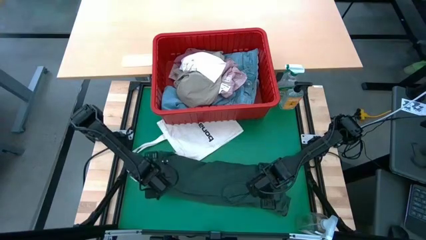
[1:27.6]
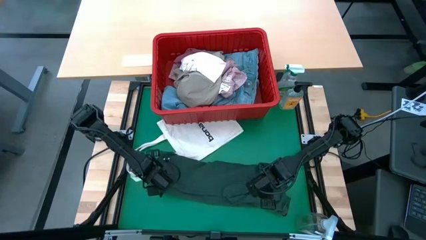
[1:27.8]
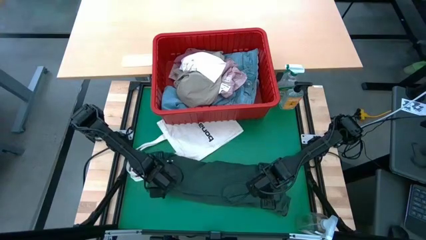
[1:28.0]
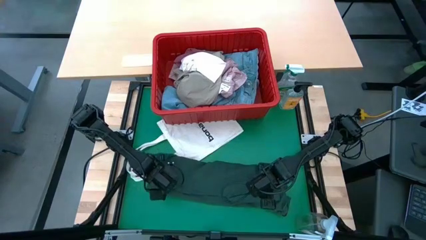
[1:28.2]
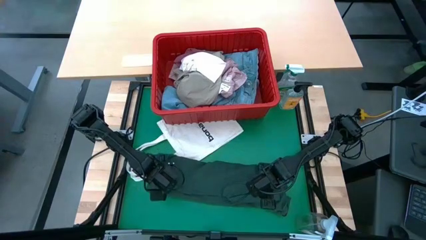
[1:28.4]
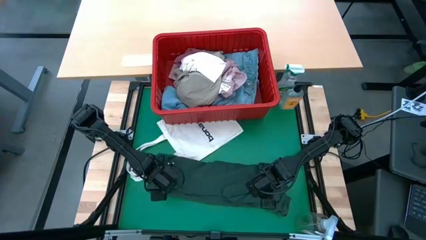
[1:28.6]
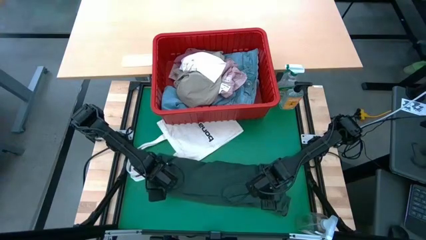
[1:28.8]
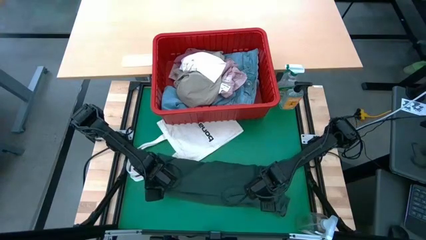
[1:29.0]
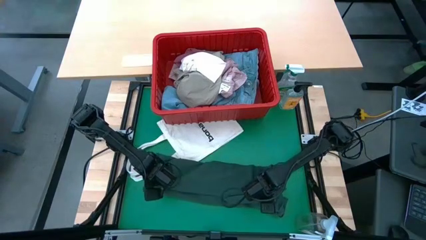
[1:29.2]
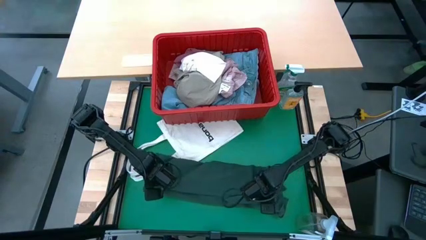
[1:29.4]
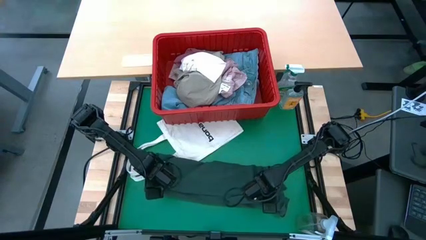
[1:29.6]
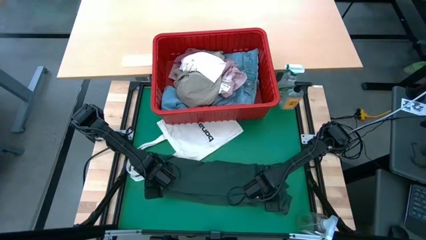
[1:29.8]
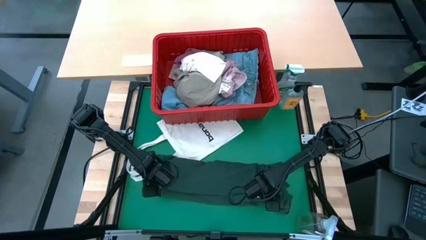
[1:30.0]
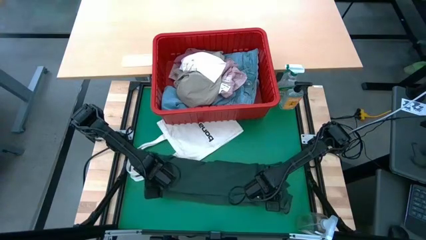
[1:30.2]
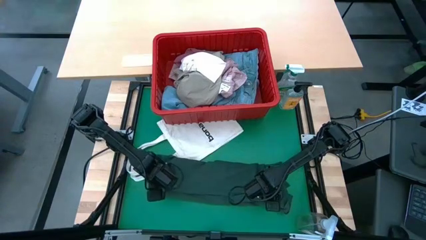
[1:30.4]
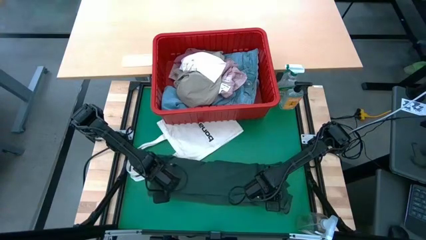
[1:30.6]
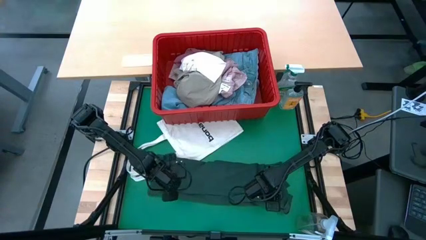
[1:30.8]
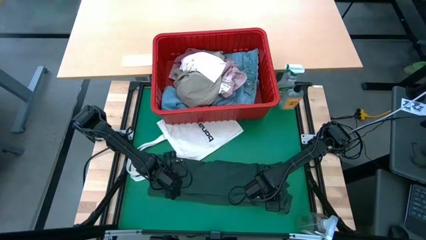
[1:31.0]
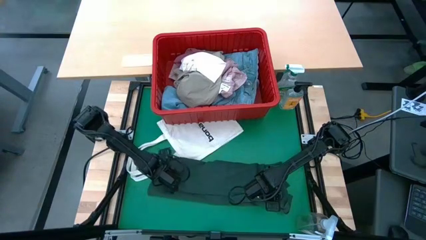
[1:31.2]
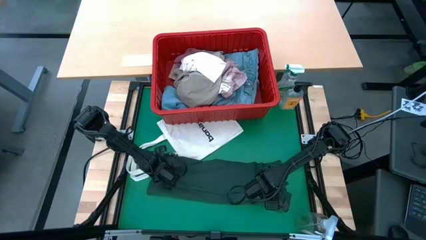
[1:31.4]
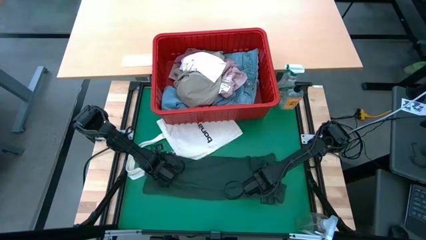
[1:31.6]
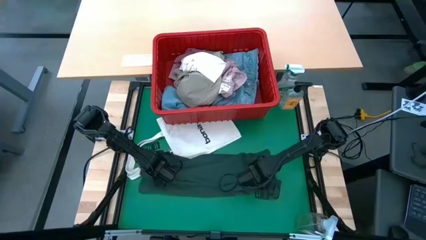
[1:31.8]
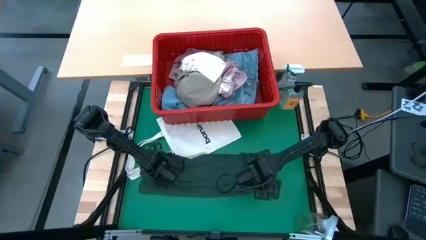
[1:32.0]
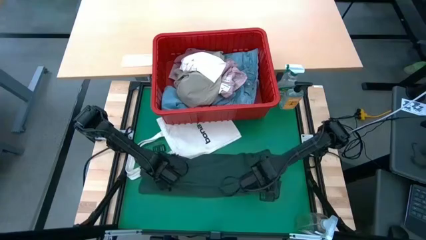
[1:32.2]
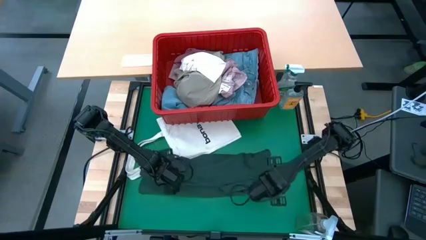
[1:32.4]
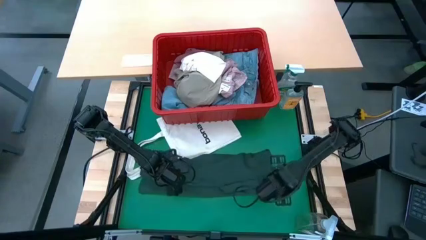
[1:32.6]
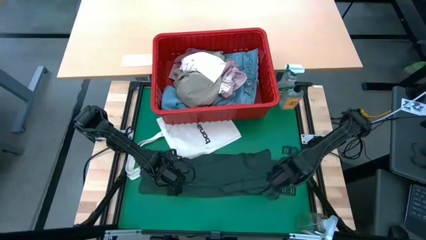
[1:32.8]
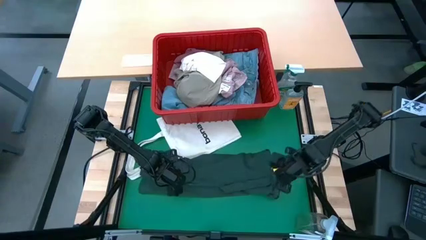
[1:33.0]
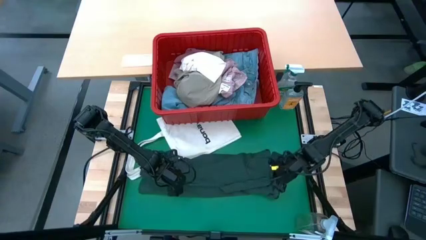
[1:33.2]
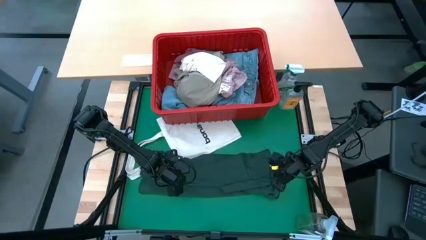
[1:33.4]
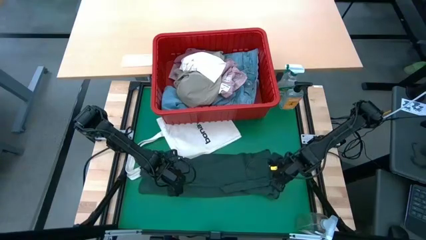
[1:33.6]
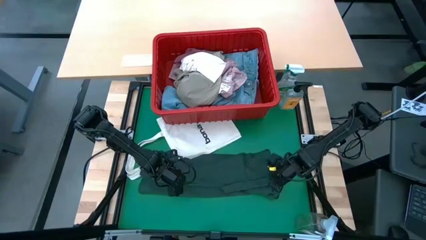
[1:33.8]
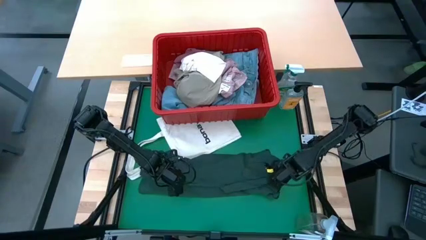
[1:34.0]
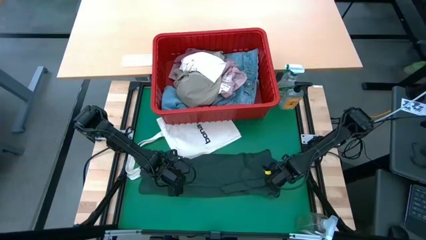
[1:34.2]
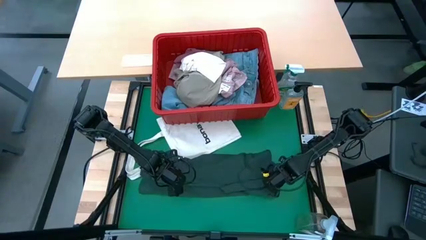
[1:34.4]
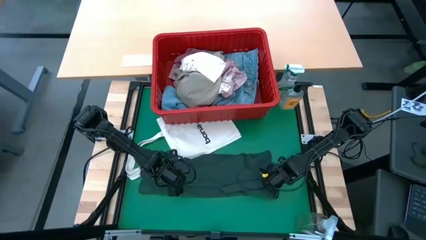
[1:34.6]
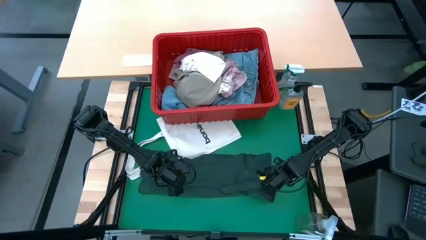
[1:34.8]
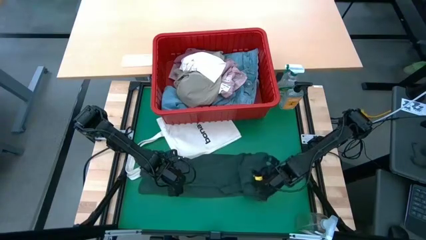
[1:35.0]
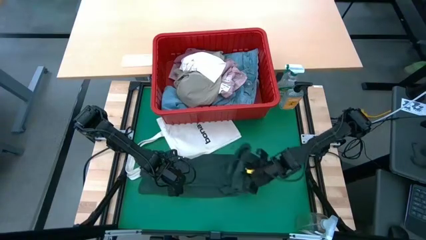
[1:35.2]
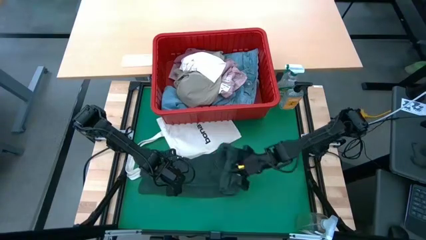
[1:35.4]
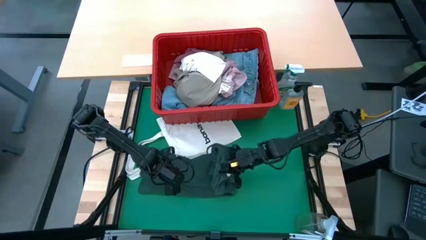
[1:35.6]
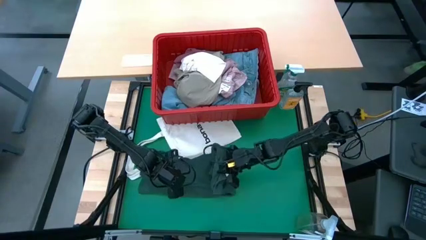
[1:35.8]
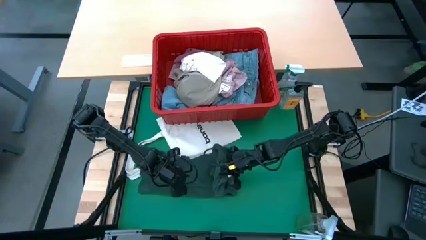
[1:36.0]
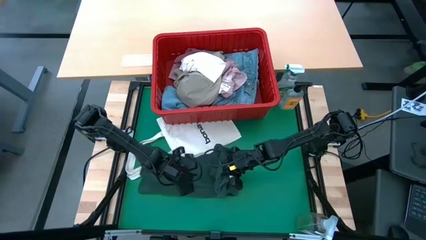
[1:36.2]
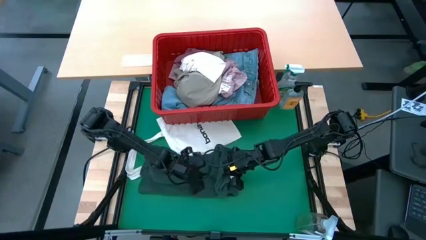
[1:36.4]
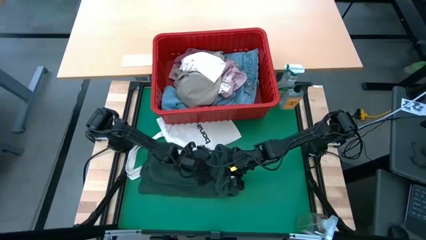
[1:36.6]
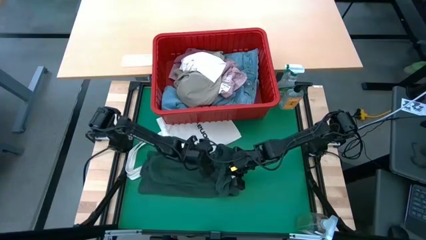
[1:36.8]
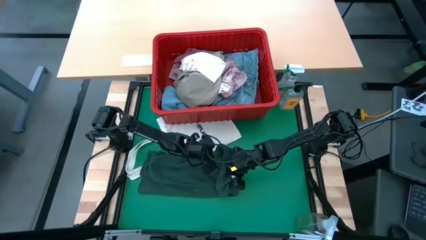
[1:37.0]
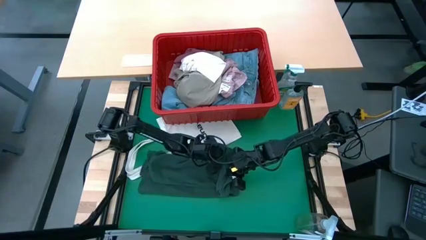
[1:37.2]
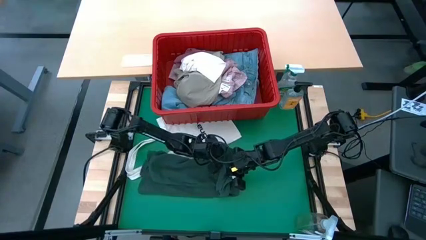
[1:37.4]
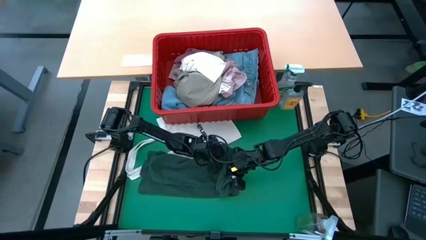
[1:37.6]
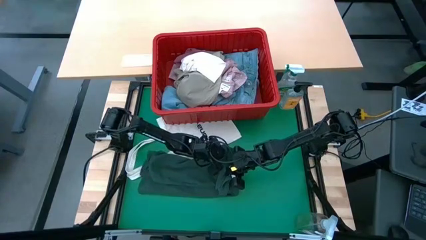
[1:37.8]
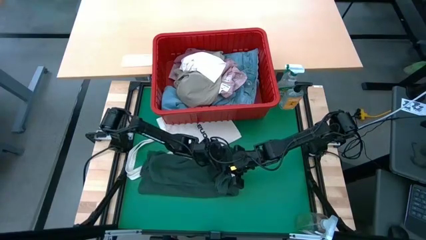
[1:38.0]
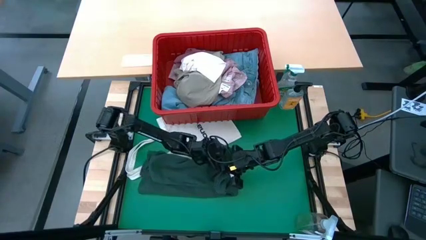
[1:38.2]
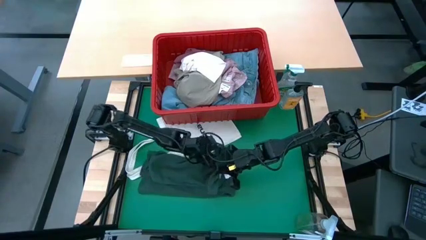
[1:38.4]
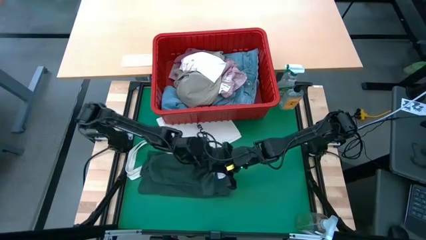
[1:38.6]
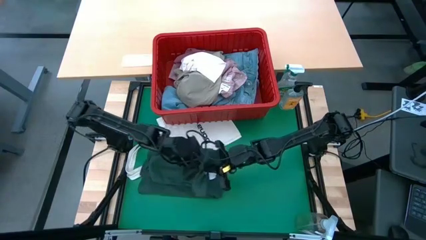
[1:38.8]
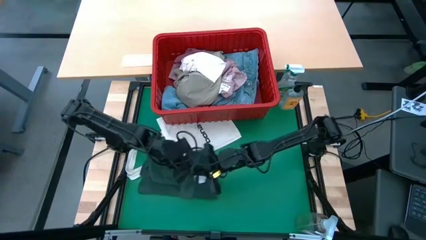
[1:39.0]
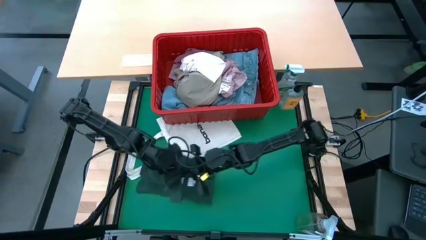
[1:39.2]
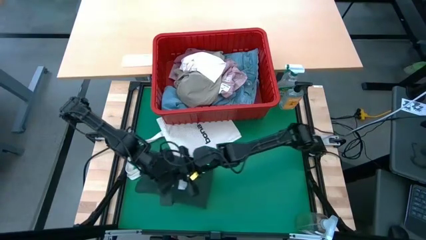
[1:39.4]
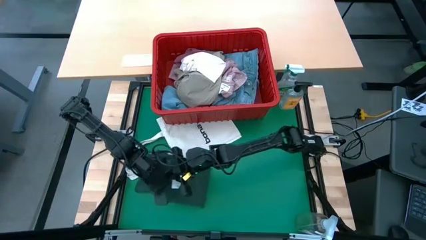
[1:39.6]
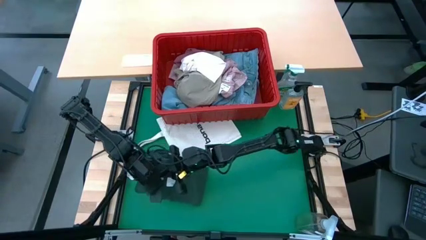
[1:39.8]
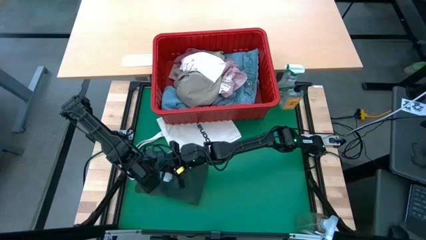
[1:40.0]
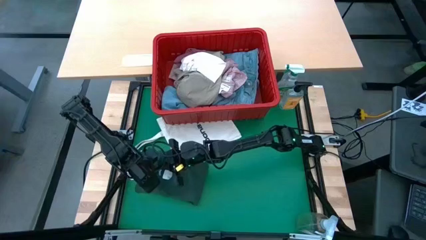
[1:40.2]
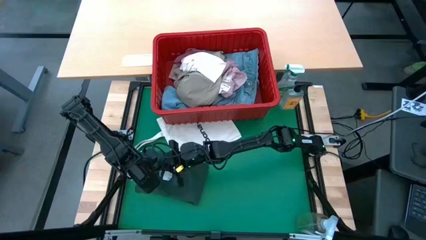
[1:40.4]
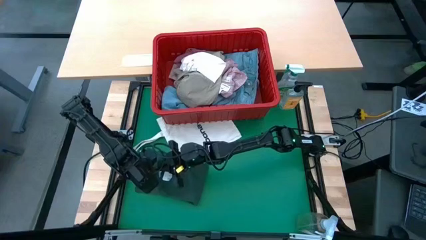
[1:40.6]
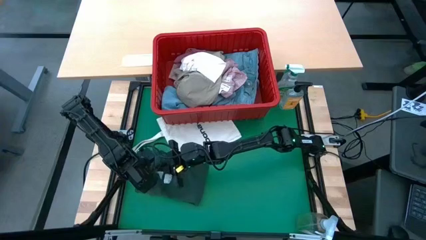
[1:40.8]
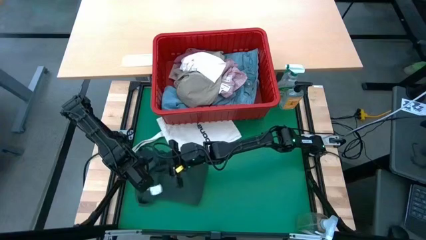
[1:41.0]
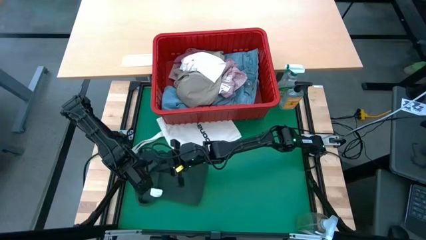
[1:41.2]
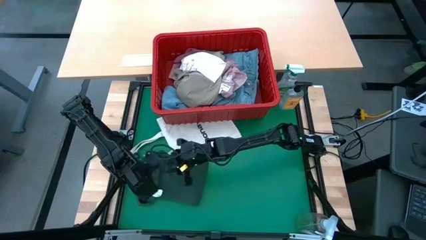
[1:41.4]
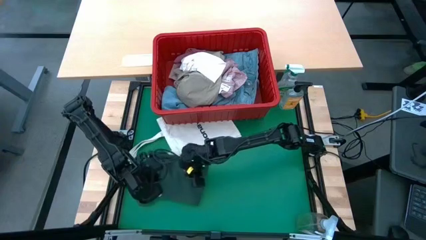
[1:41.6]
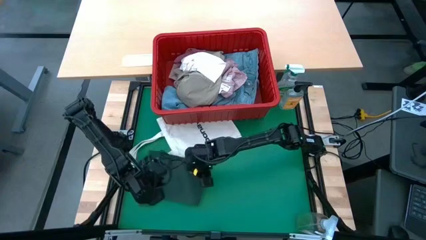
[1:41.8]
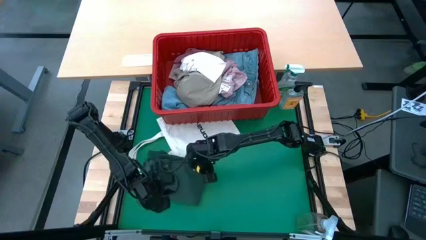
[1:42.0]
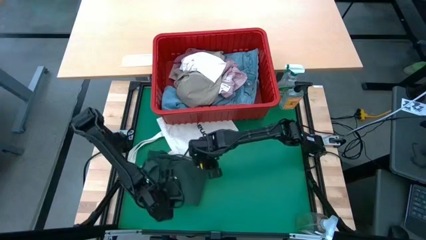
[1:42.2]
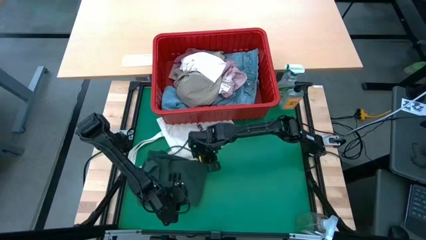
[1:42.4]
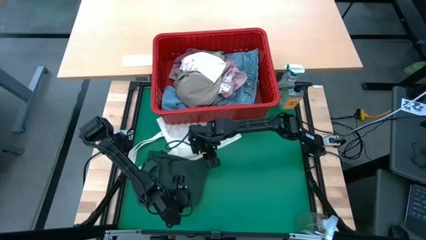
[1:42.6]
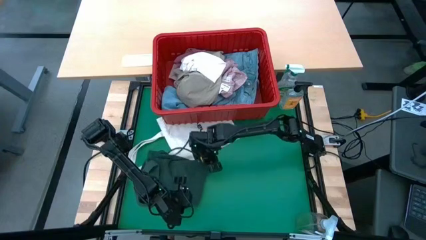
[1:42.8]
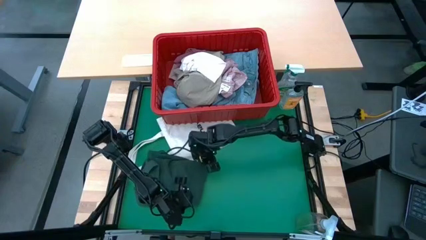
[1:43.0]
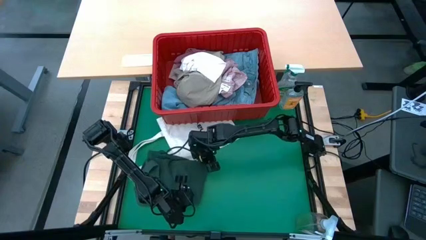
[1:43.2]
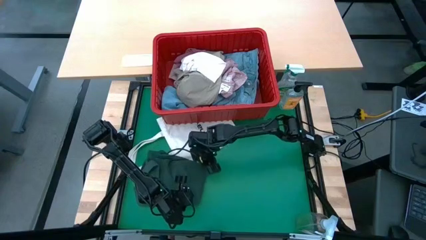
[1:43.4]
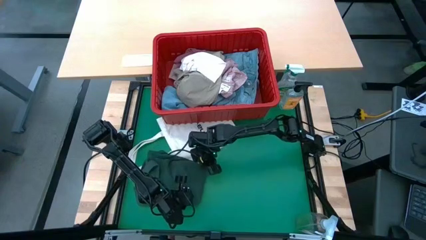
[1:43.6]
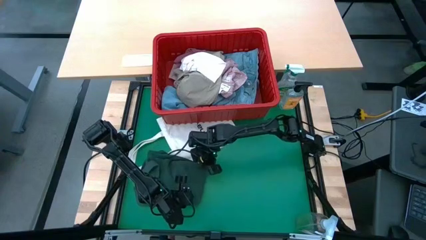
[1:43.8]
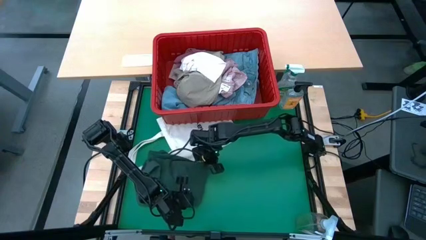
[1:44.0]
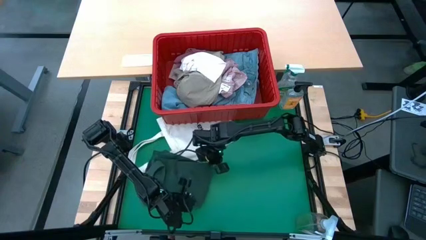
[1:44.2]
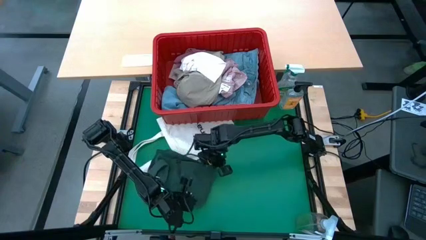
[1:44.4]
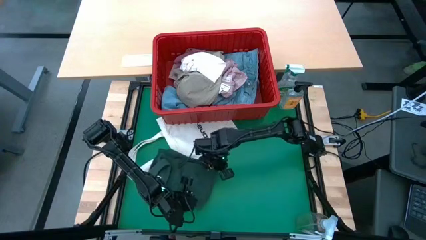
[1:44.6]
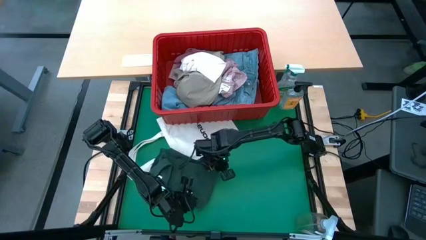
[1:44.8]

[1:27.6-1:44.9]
Task: Fold laundry
Fold the green shirt
